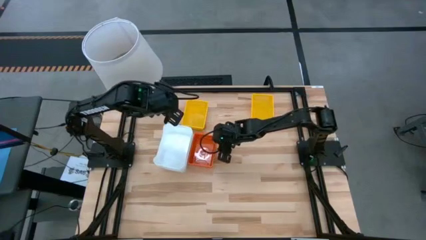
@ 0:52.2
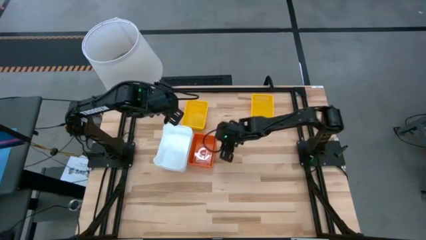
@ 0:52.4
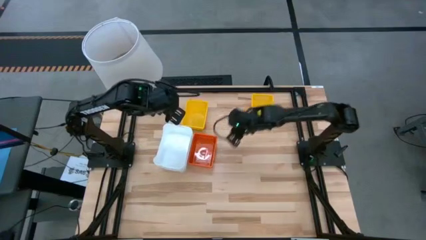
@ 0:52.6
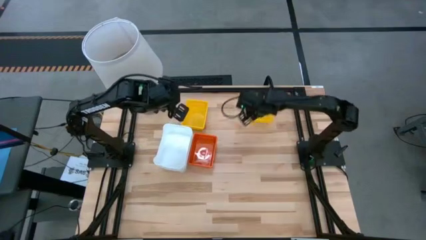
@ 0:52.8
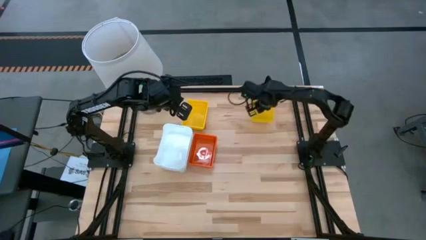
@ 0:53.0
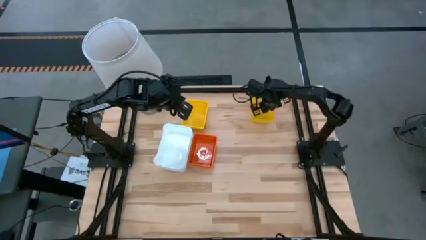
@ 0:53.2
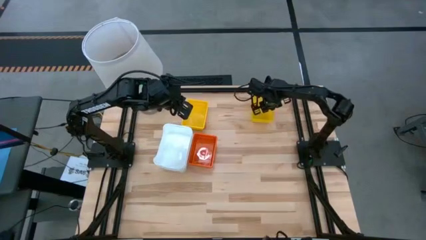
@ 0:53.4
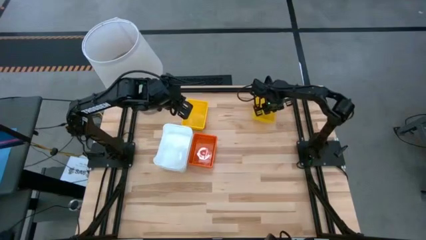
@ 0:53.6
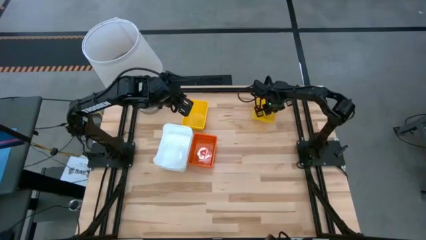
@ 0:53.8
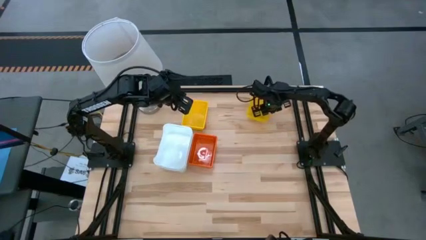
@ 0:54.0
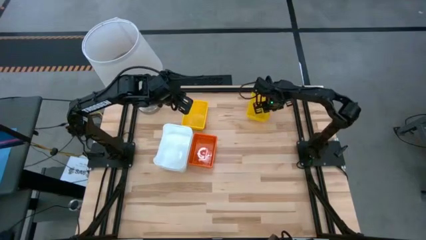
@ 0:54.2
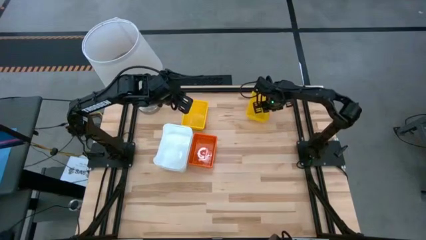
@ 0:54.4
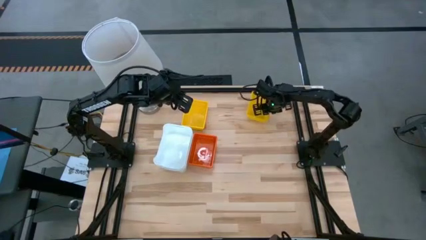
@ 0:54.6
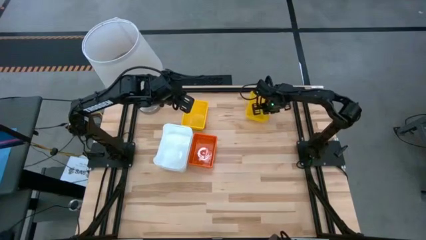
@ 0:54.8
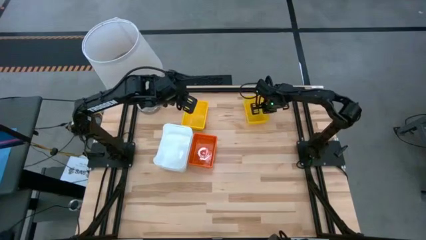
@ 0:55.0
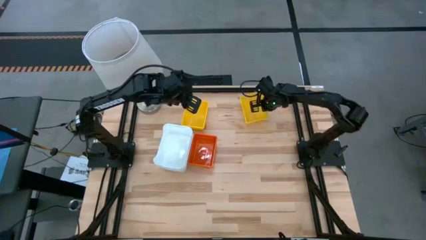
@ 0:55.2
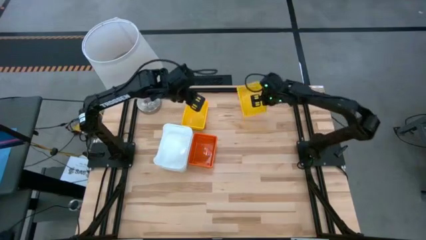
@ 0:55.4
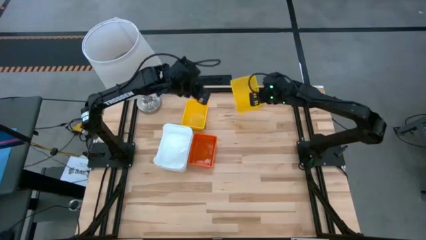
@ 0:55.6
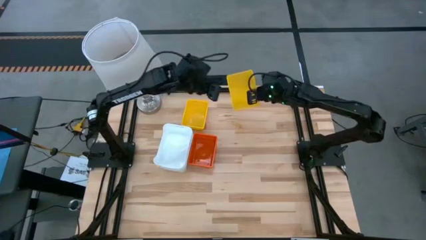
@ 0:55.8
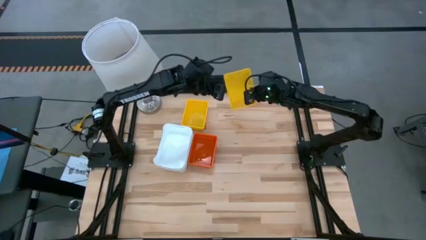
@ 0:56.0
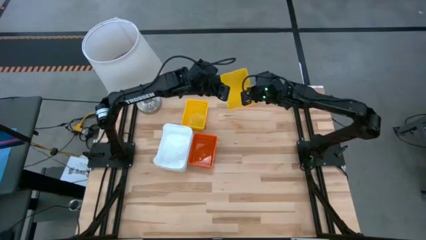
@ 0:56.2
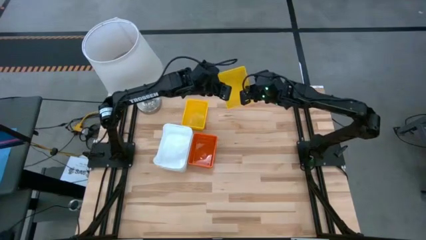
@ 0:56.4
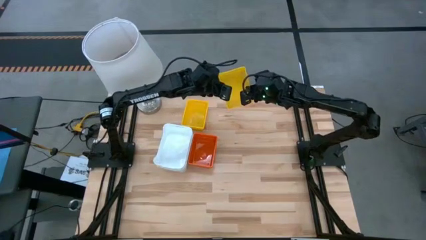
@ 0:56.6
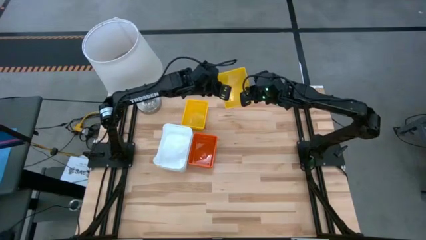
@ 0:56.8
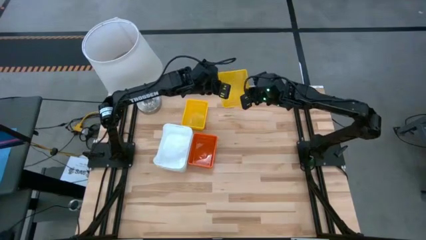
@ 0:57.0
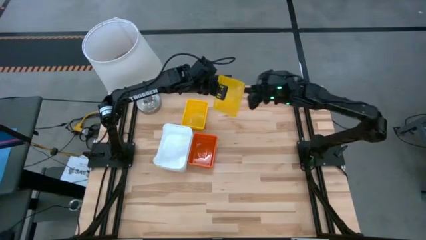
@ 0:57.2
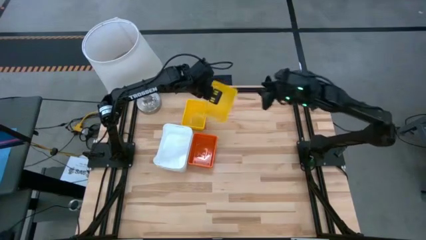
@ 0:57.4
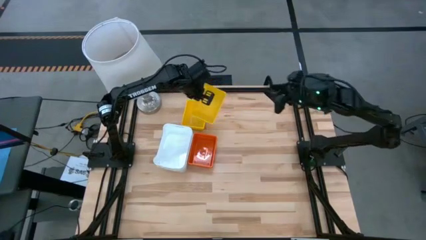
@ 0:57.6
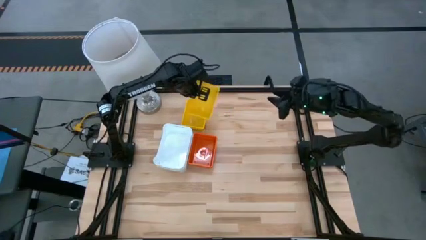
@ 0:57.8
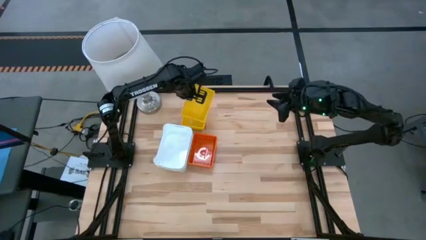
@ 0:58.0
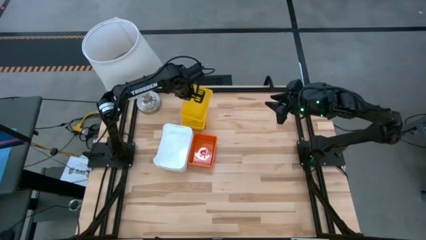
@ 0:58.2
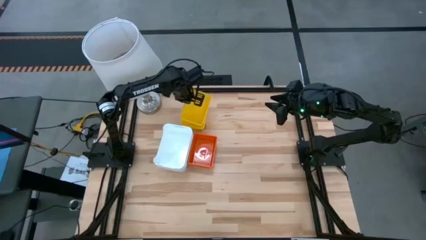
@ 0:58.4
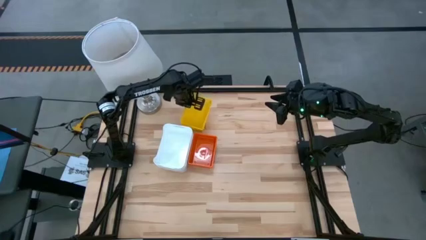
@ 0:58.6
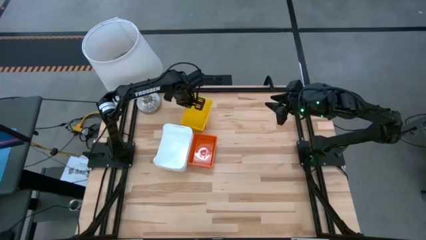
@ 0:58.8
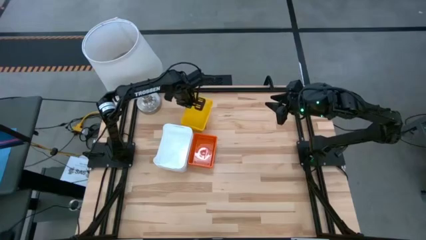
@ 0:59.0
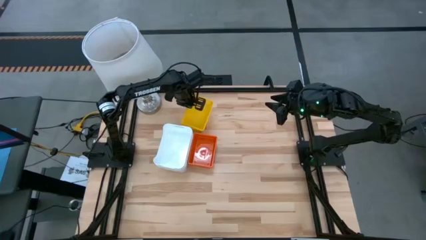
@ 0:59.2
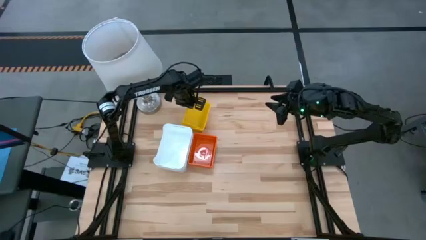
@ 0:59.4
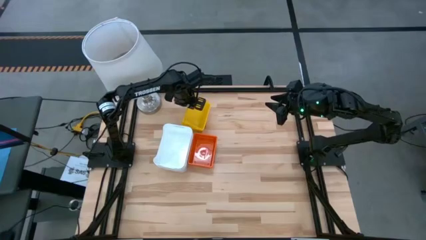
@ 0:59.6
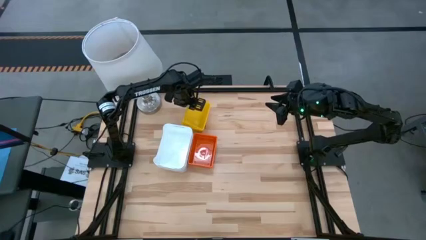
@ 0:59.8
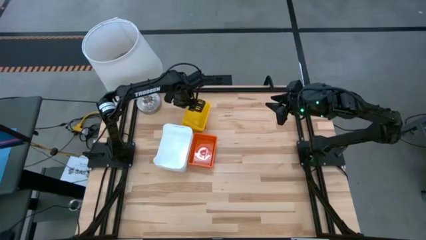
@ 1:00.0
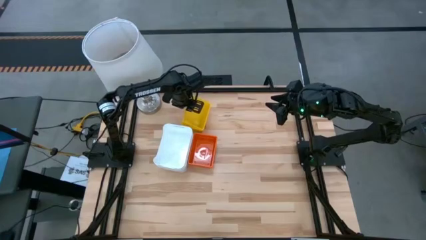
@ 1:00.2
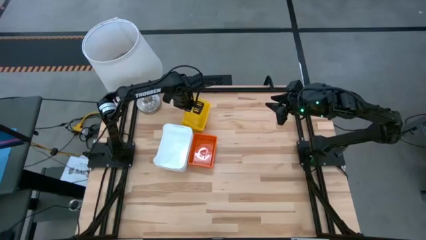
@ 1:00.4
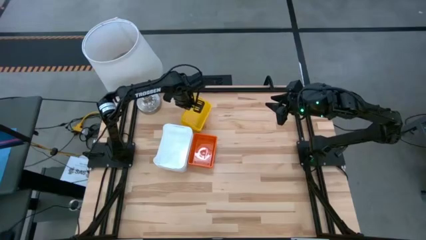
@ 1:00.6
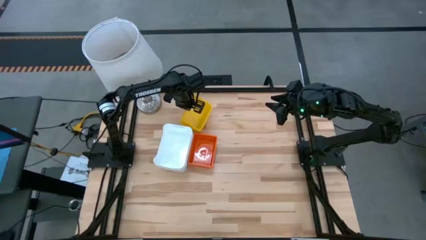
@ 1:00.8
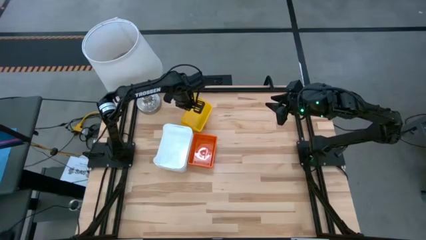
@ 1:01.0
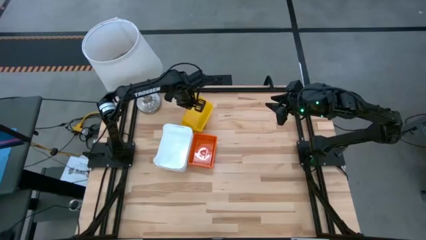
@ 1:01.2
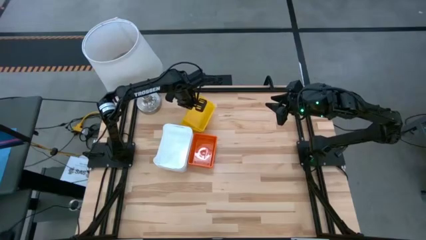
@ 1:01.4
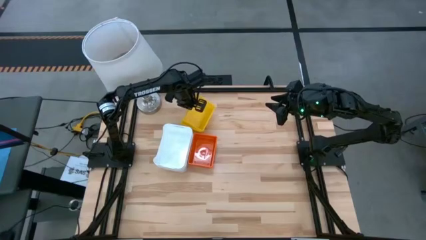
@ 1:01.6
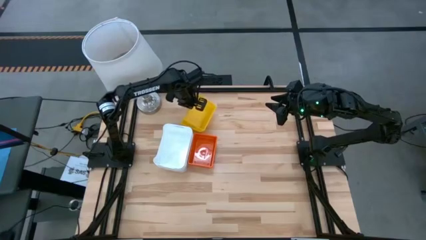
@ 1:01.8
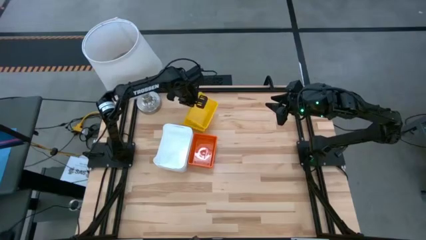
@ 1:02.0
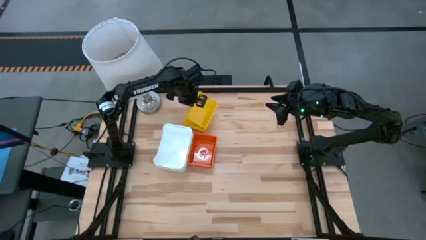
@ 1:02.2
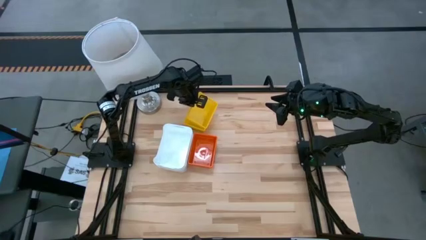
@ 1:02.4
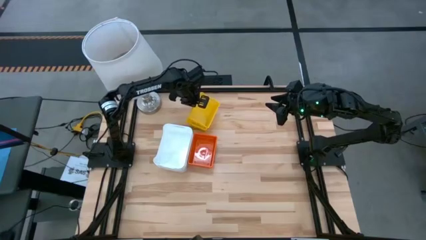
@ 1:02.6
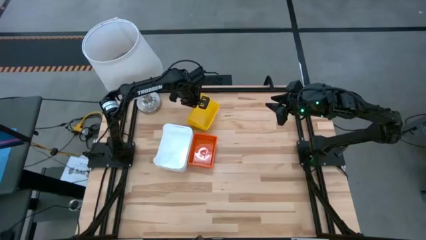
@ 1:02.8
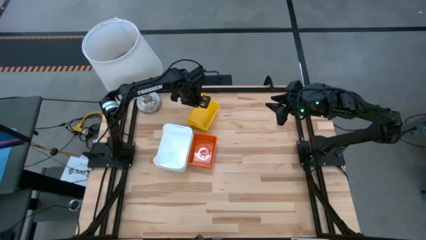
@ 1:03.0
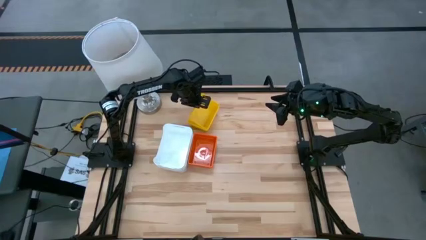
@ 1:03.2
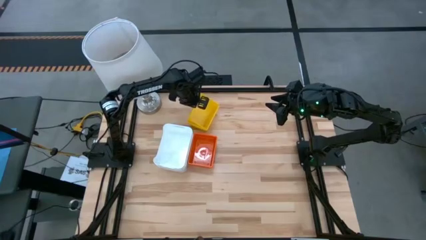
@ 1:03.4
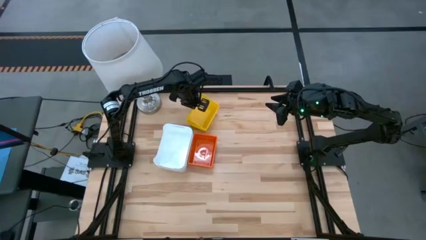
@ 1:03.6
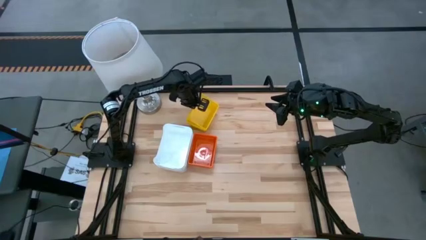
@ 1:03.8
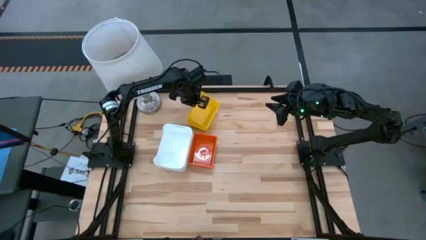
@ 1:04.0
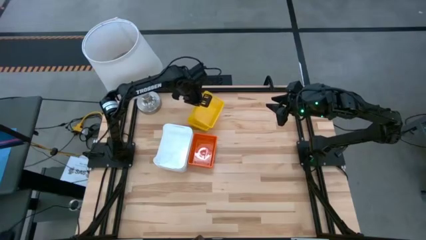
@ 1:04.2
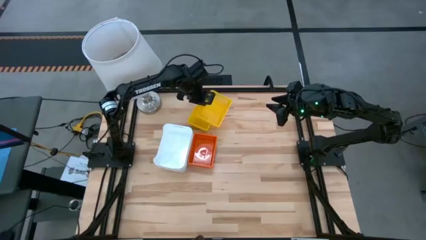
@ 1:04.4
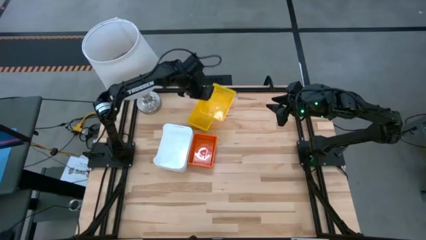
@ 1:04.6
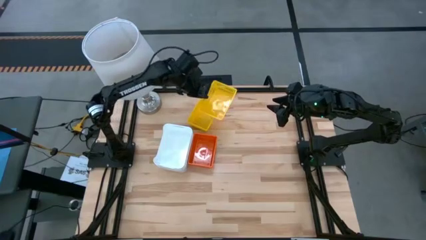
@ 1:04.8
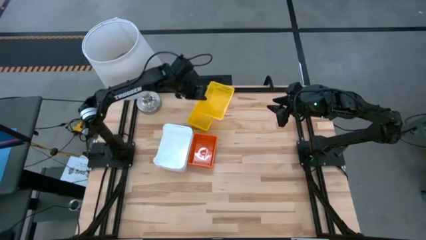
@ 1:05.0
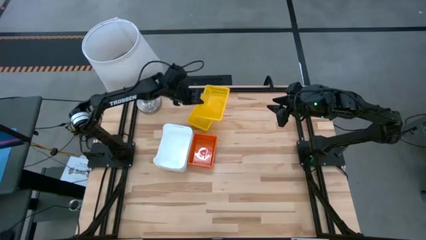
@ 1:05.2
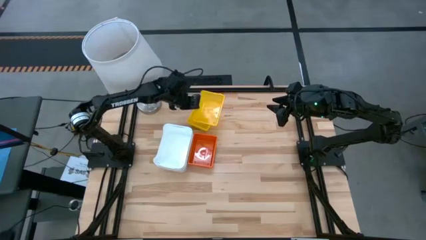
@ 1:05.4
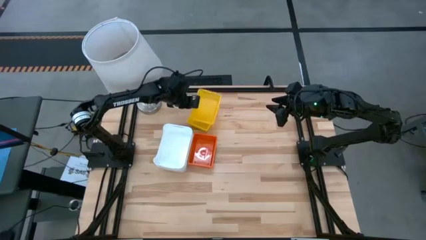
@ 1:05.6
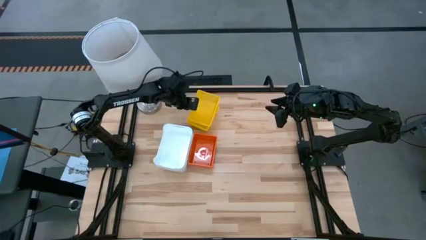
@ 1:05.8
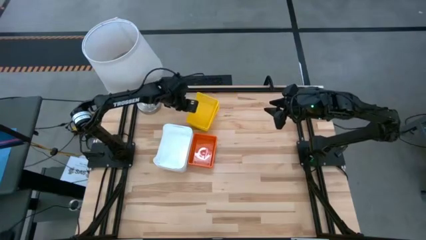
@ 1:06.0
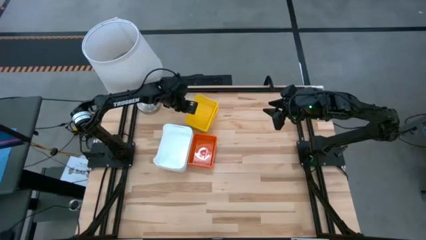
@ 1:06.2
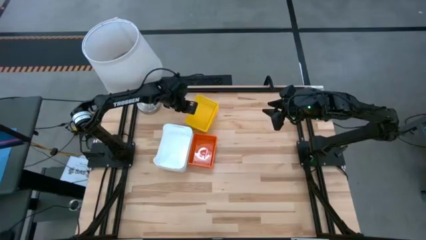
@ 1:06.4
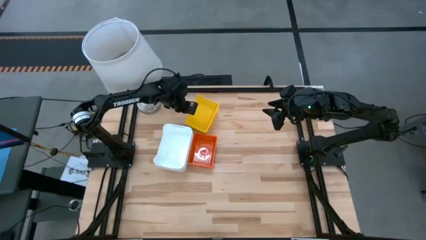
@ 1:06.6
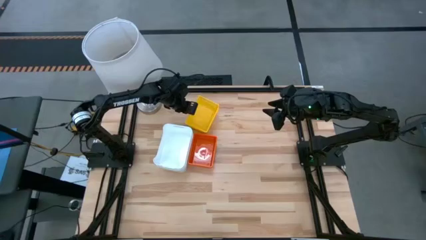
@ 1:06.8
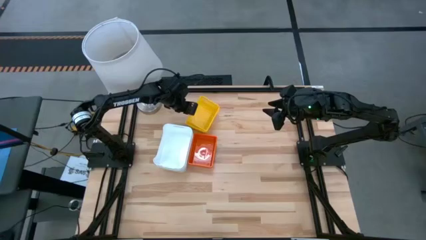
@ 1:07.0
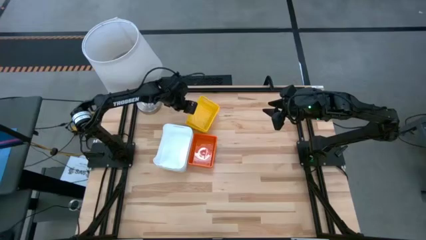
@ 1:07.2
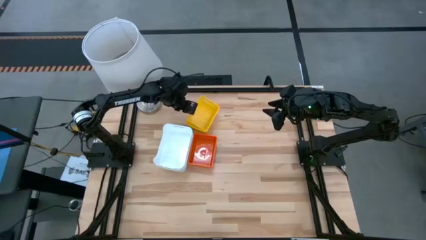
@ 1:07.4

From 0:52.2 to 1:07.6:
Stack the yellow bin on the left yellow bin
